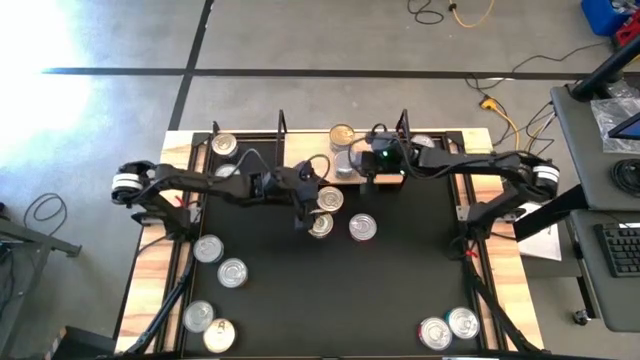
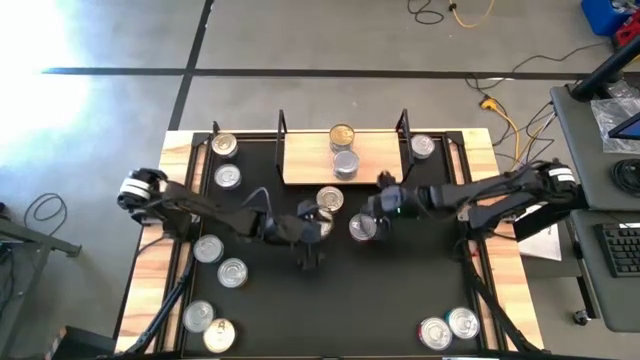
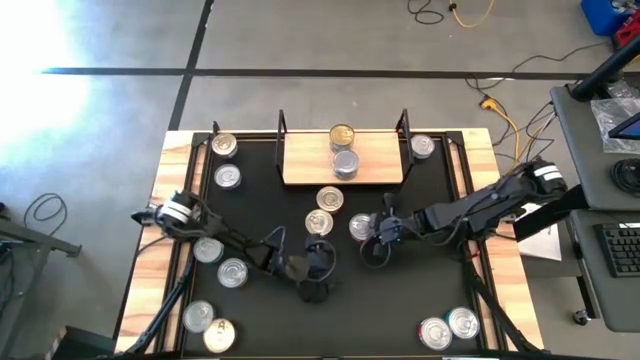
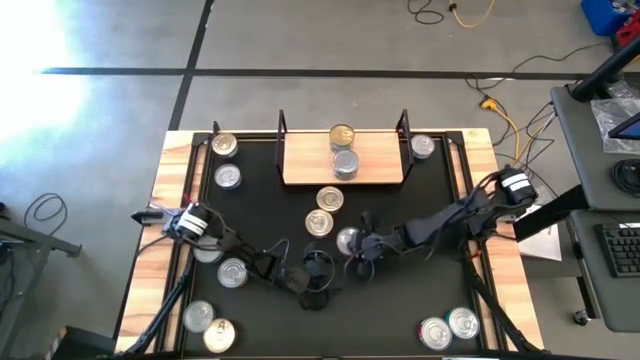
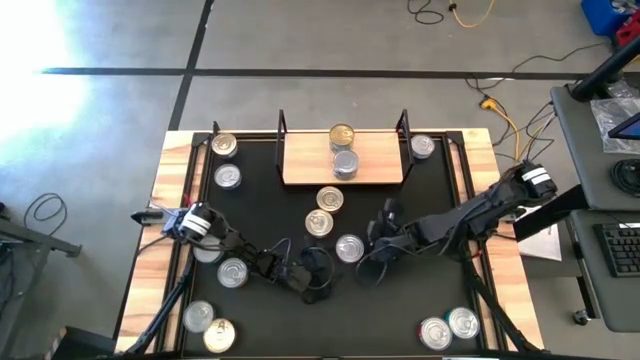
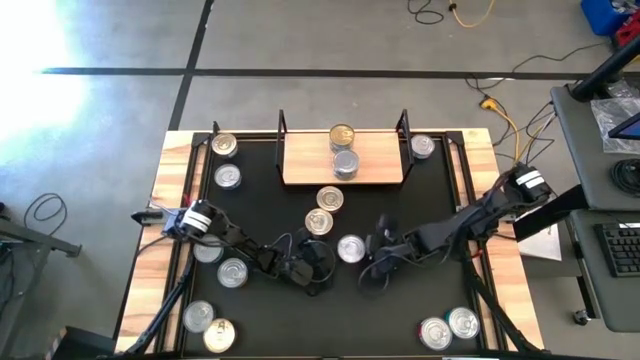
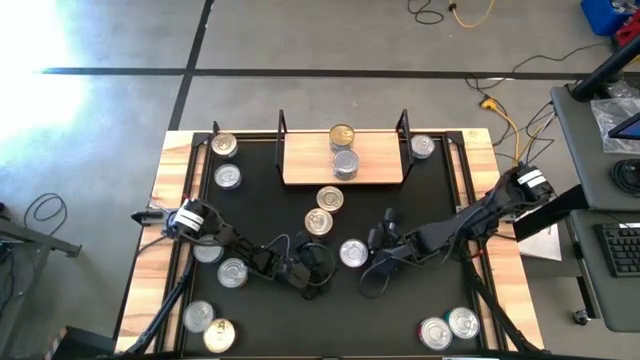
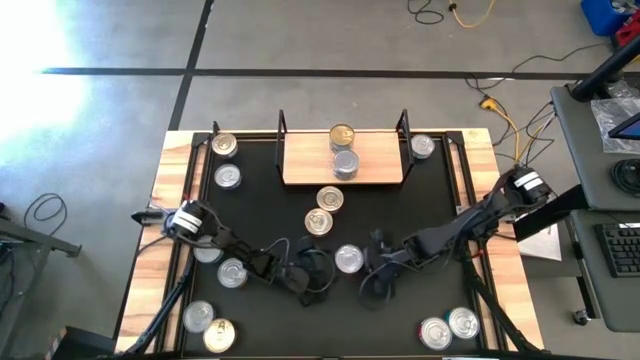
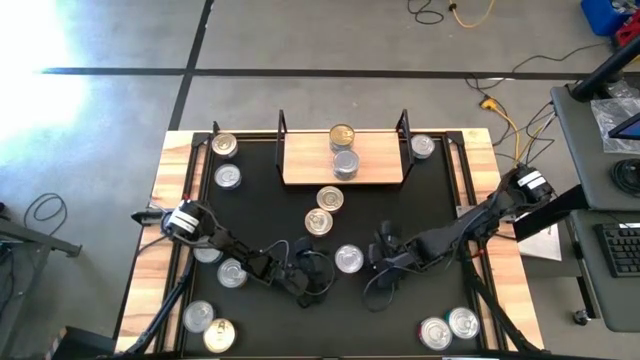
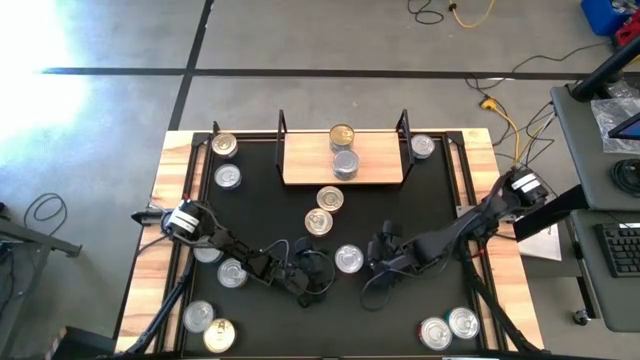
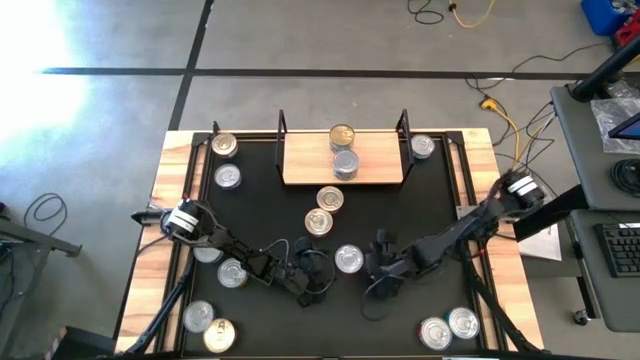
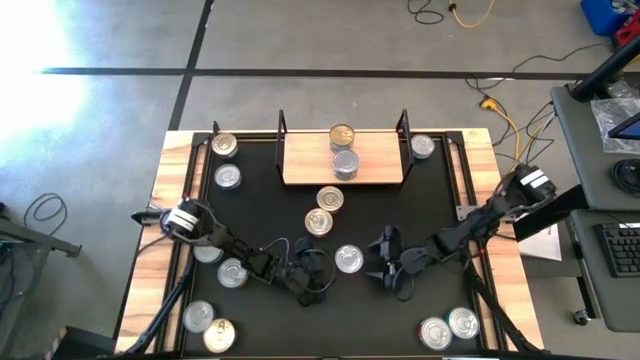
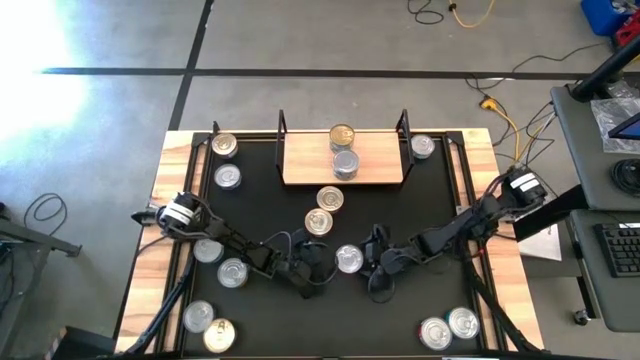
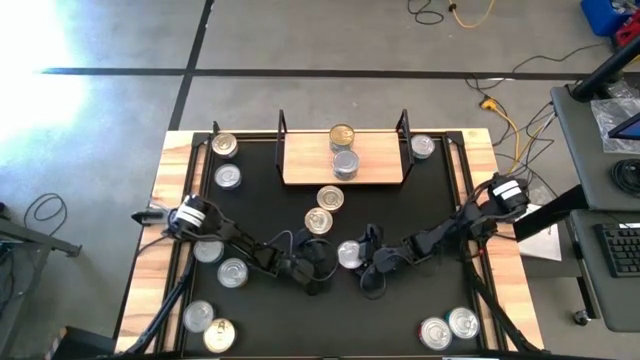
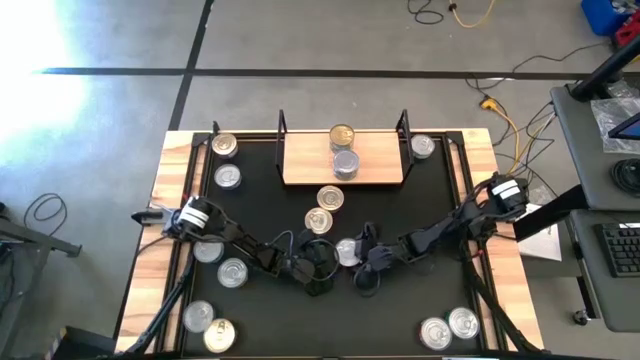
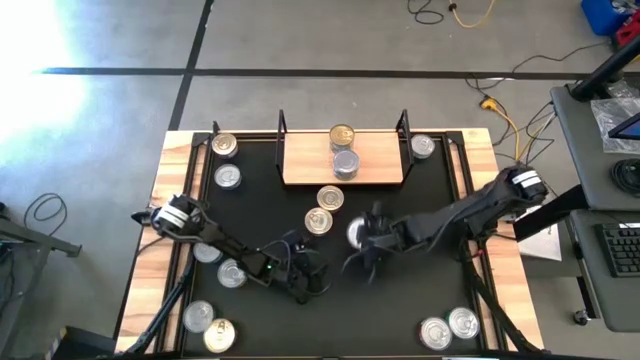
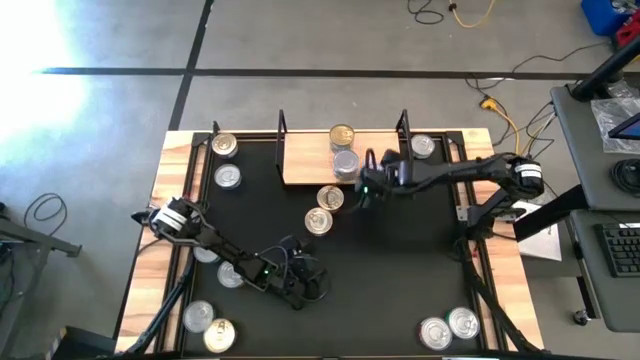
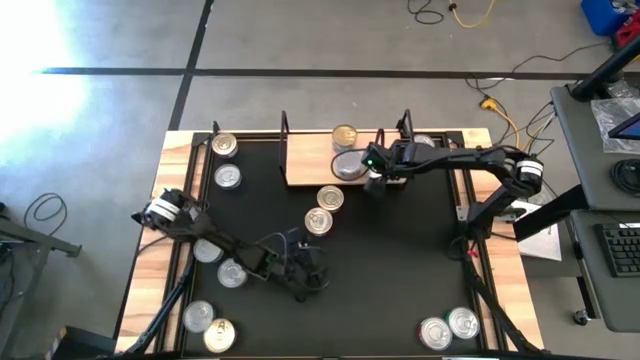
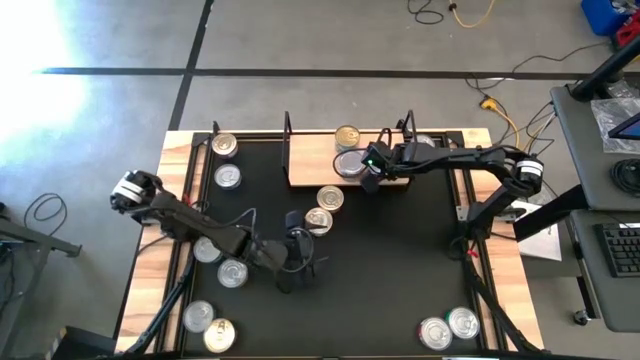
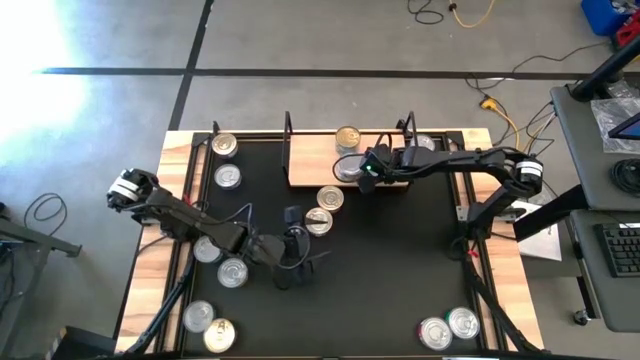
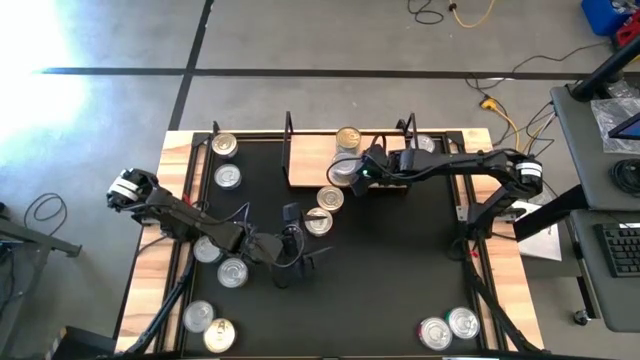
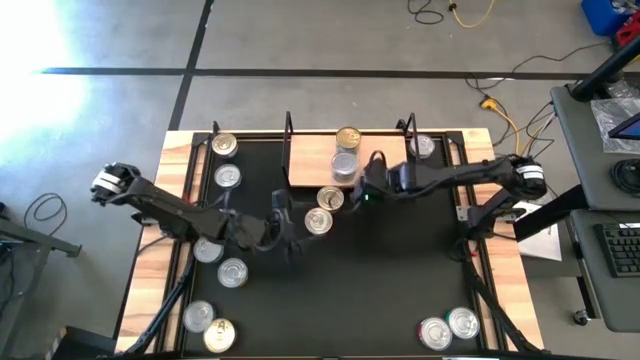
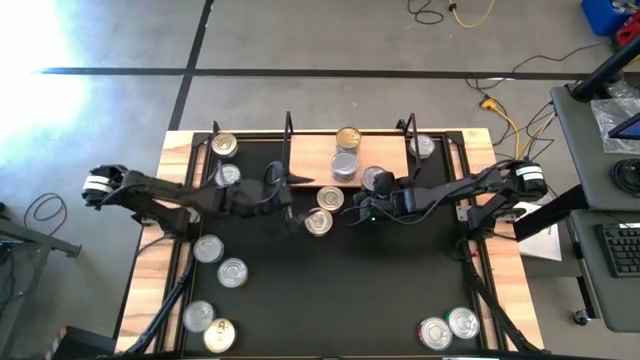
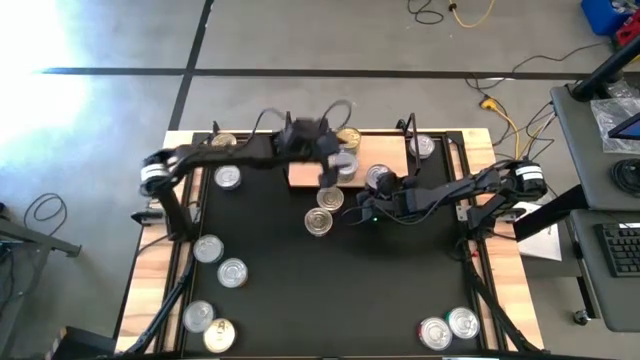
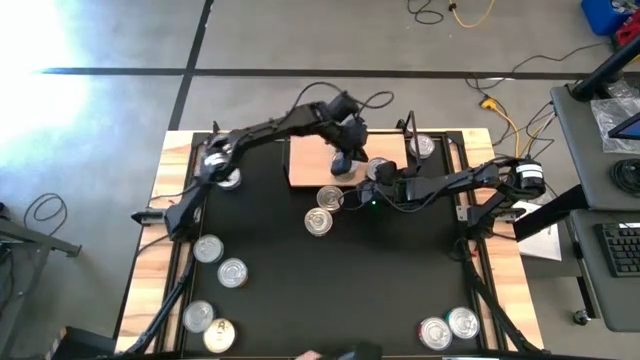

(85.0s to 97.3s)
Task: Stack canned seafood by type on shelf
Put the red tuna can on the shelf

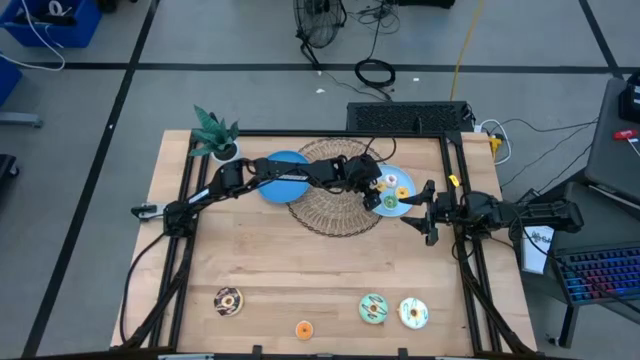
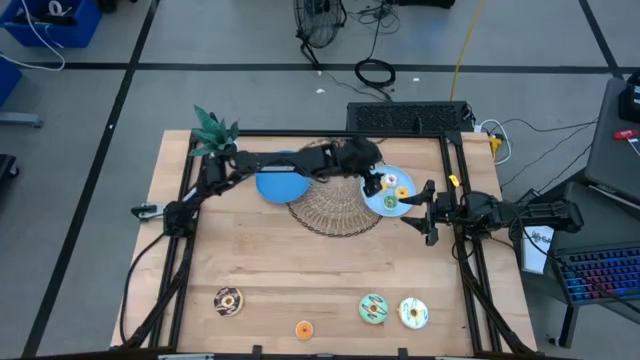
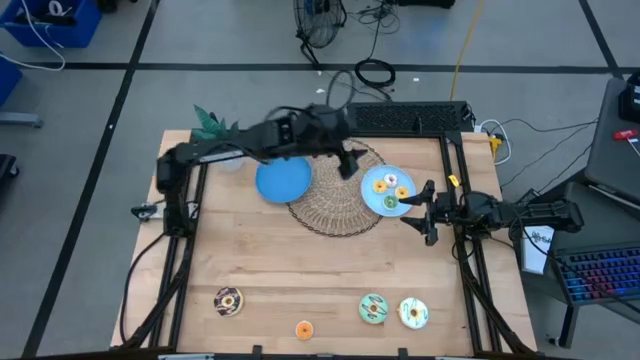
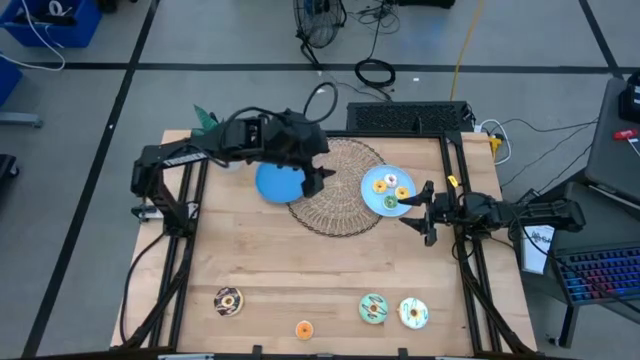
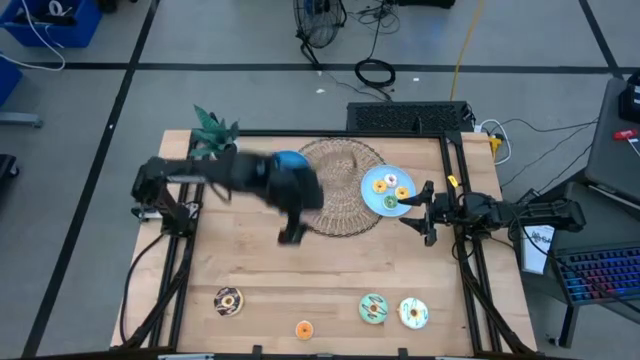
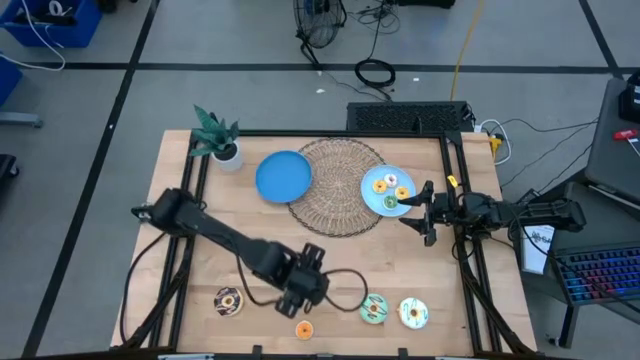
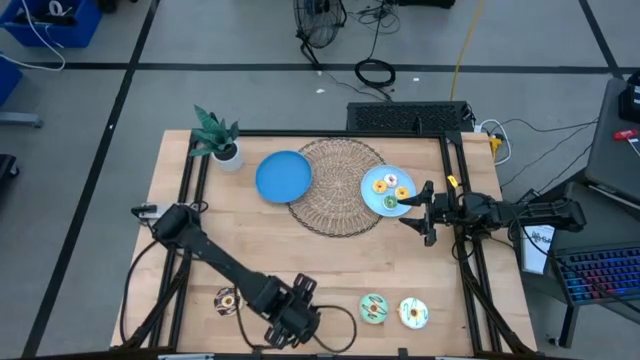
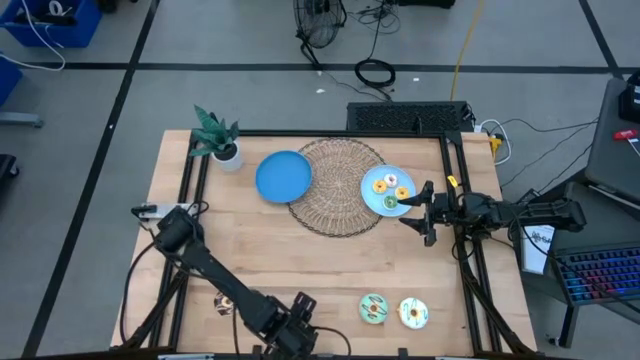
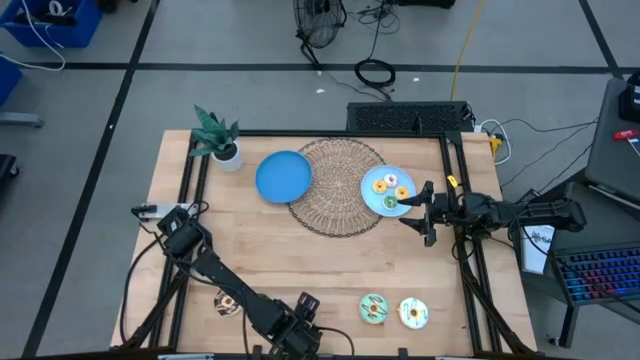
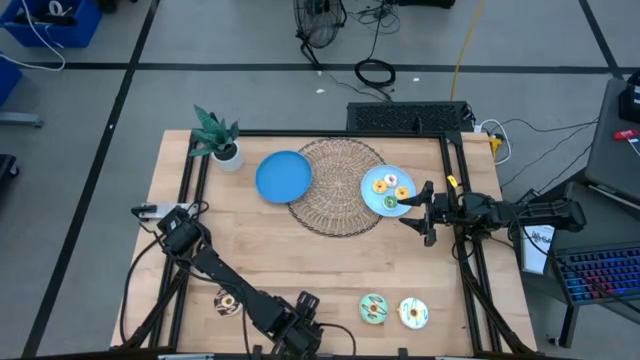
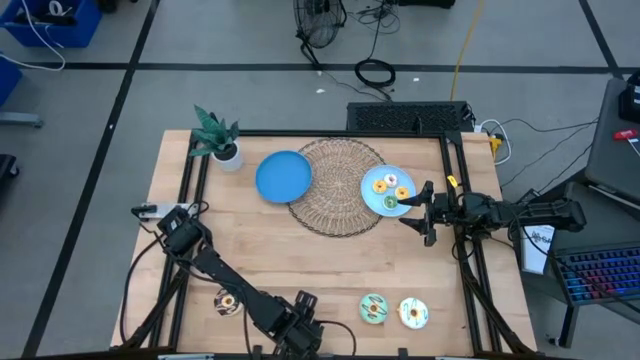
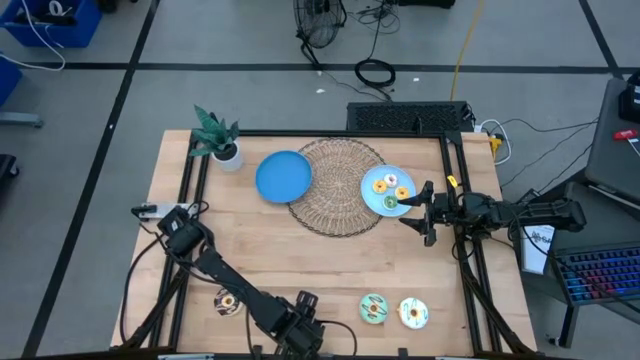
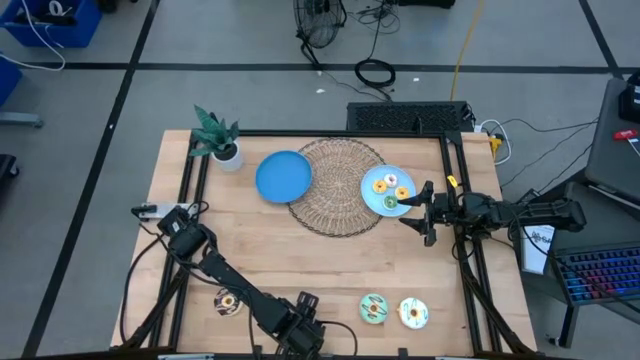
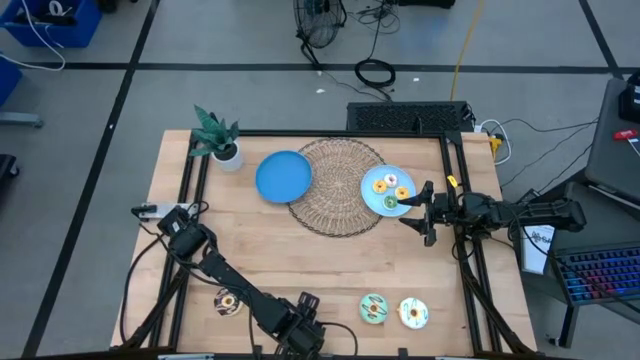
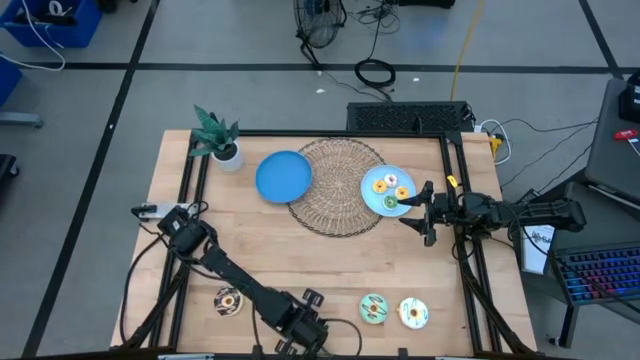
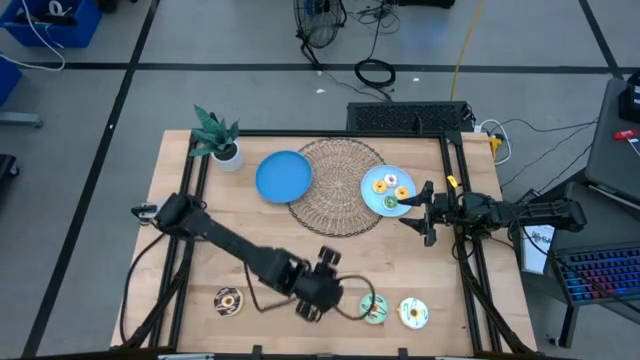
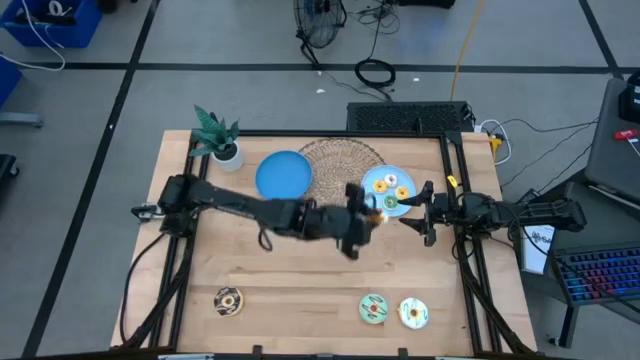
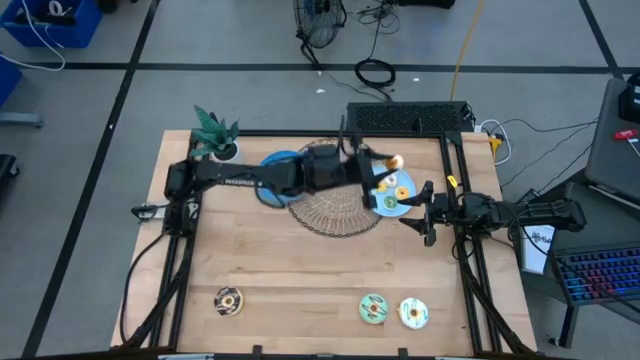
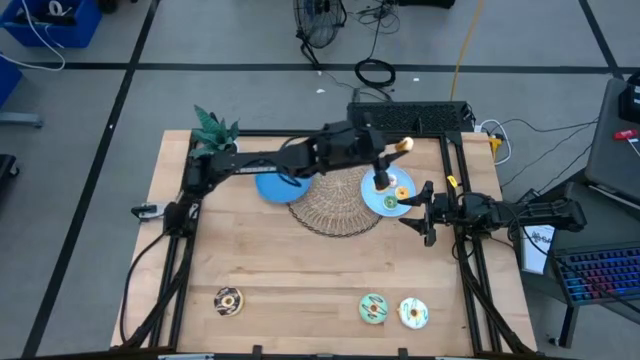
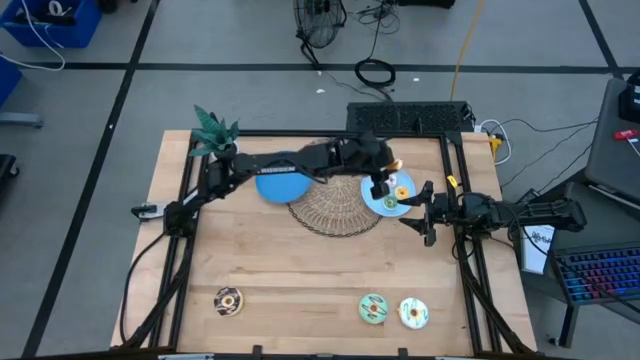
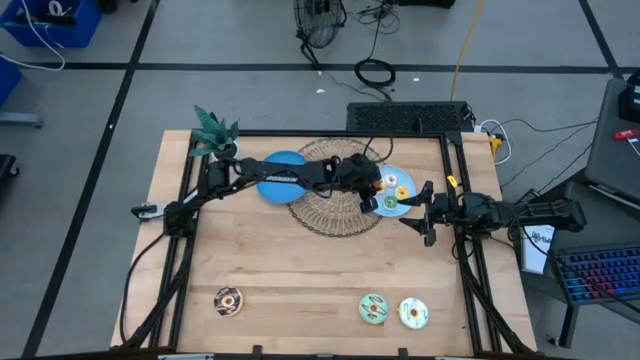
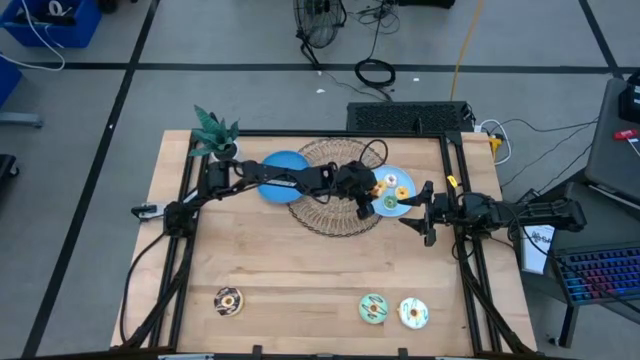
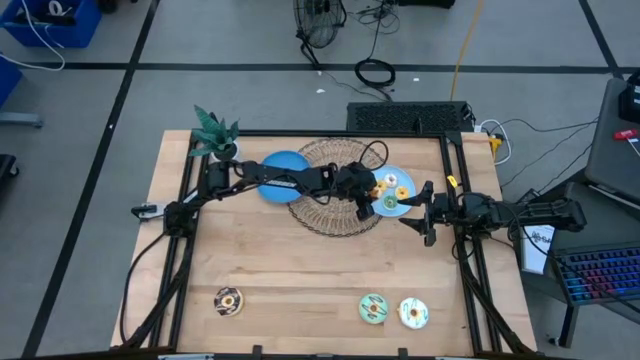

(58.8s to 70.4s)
Task: Pick & Place donuts
Put the small orange donut on the light blue plate
